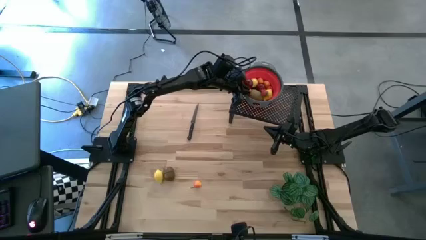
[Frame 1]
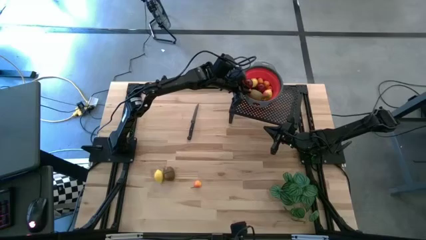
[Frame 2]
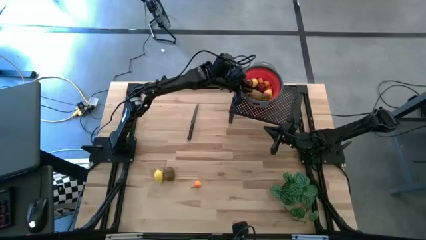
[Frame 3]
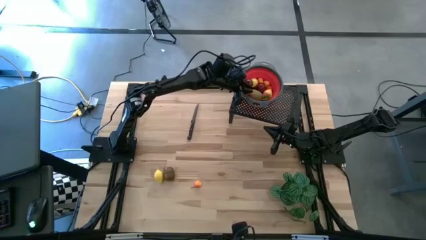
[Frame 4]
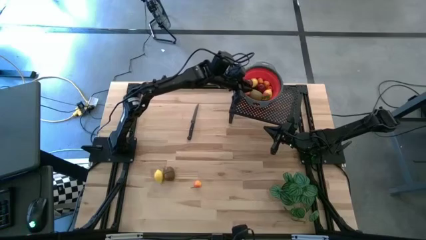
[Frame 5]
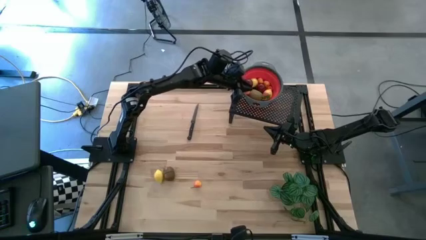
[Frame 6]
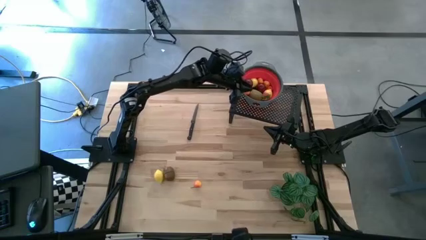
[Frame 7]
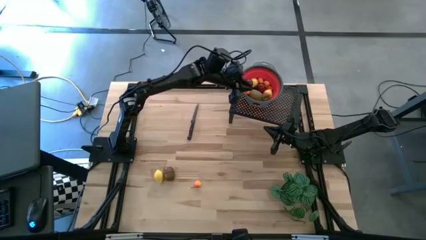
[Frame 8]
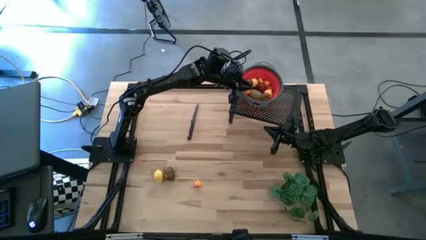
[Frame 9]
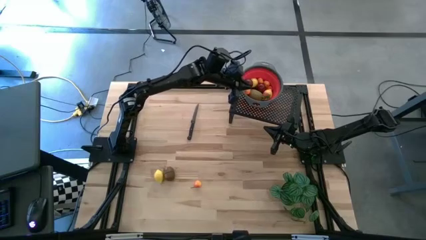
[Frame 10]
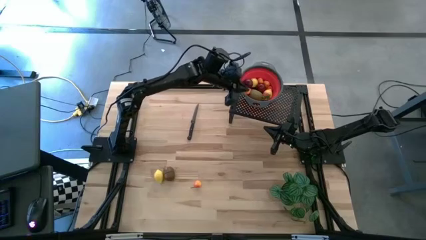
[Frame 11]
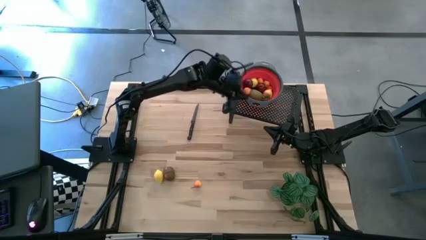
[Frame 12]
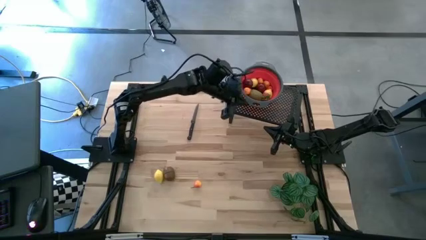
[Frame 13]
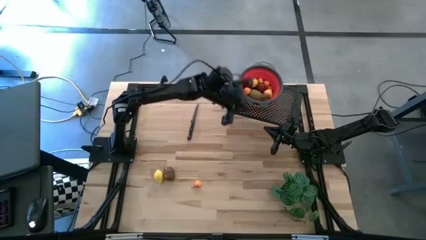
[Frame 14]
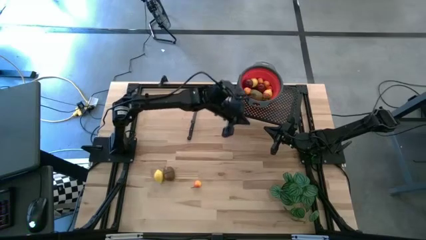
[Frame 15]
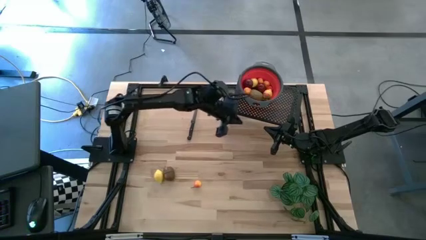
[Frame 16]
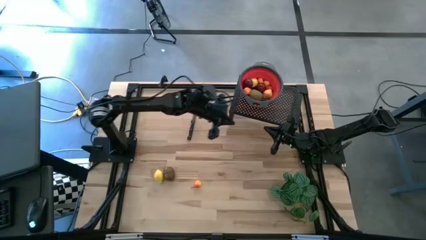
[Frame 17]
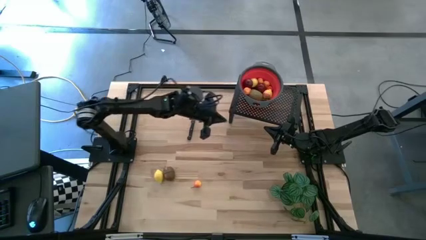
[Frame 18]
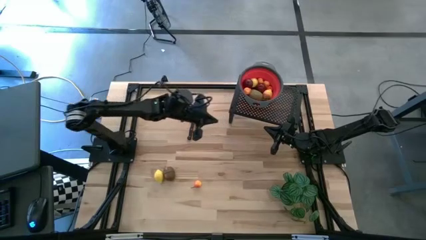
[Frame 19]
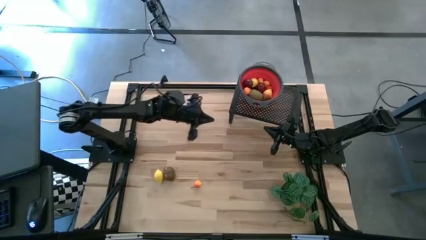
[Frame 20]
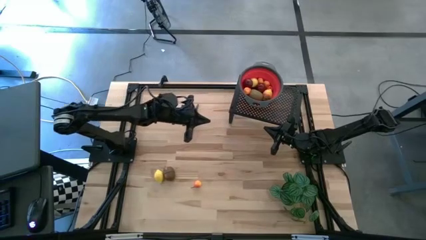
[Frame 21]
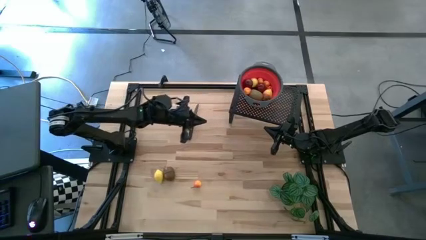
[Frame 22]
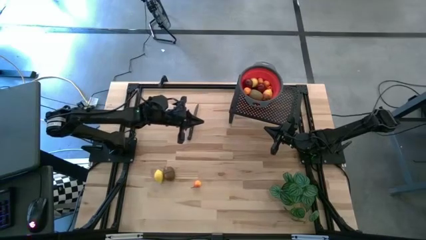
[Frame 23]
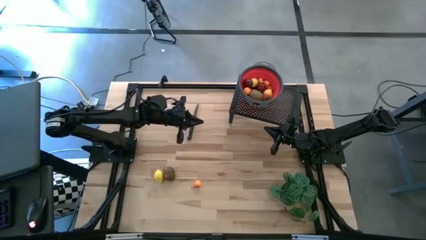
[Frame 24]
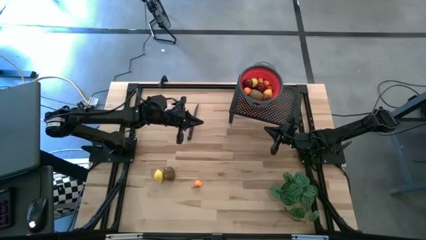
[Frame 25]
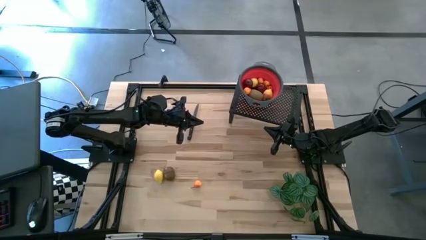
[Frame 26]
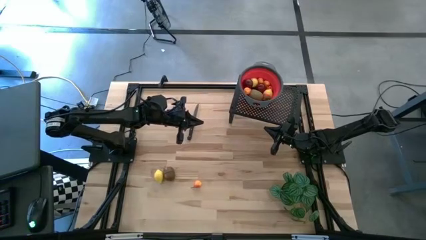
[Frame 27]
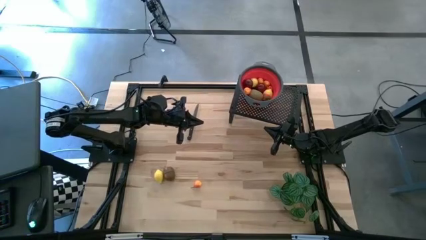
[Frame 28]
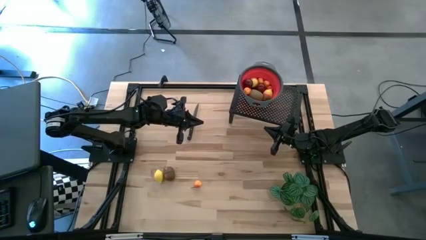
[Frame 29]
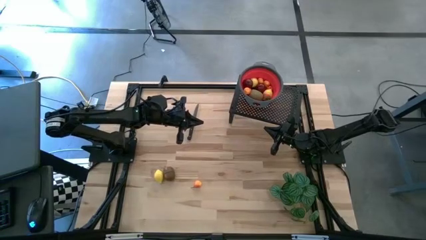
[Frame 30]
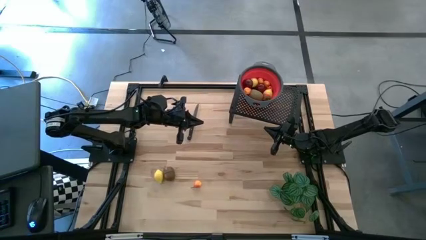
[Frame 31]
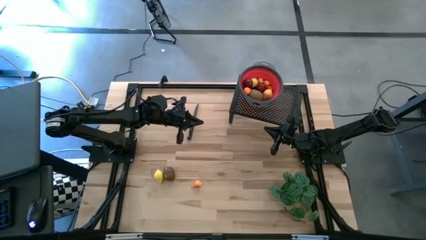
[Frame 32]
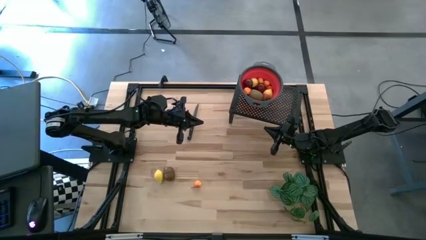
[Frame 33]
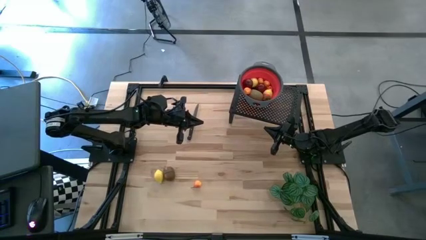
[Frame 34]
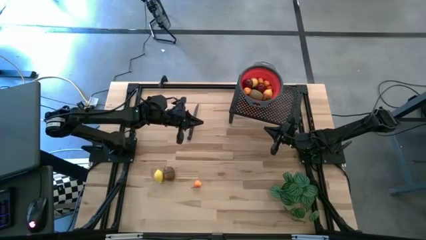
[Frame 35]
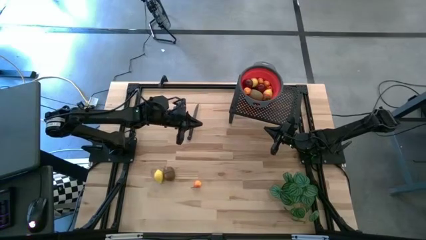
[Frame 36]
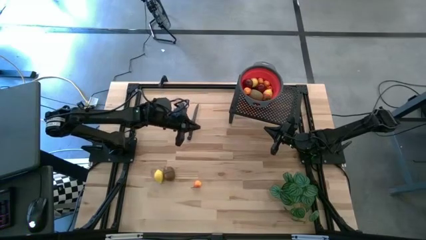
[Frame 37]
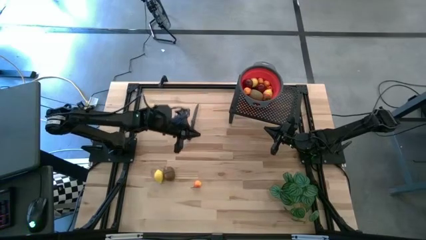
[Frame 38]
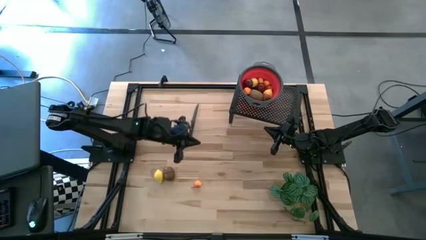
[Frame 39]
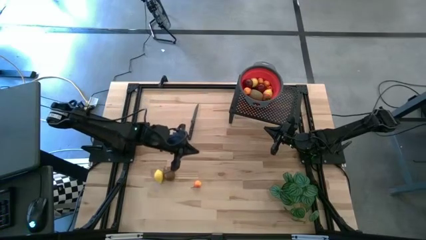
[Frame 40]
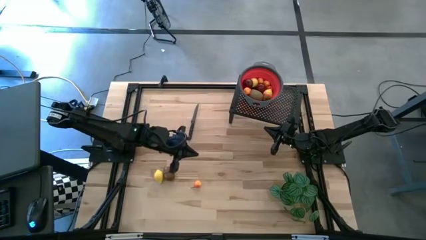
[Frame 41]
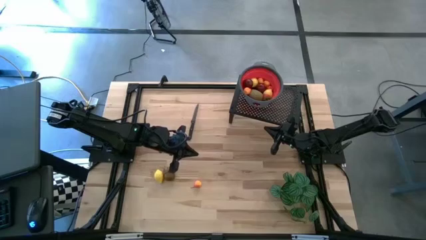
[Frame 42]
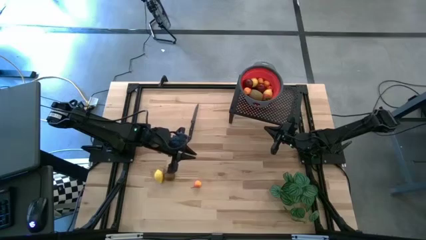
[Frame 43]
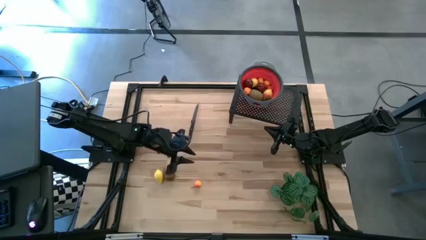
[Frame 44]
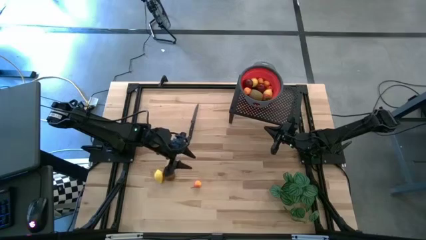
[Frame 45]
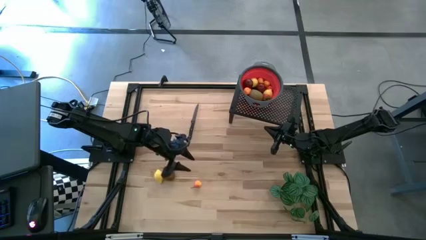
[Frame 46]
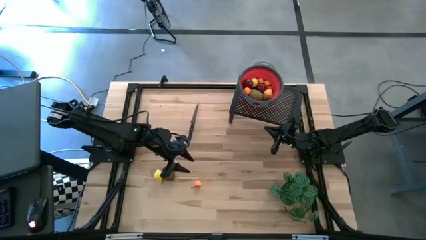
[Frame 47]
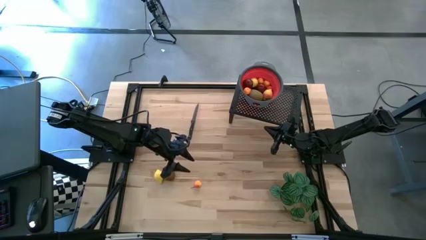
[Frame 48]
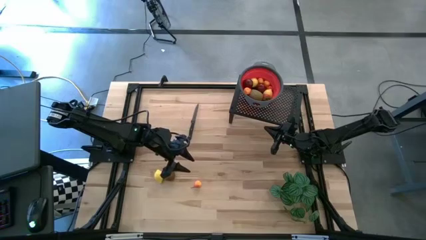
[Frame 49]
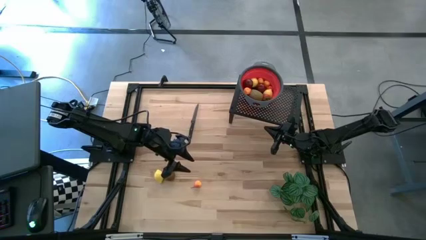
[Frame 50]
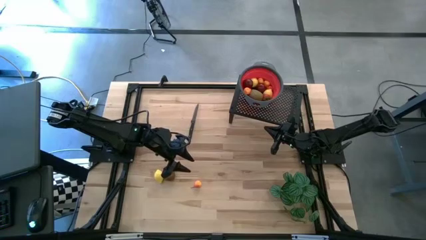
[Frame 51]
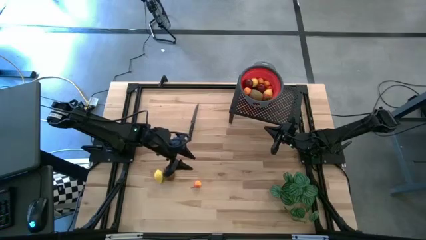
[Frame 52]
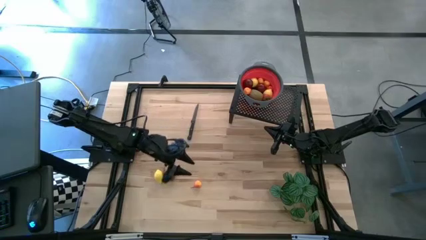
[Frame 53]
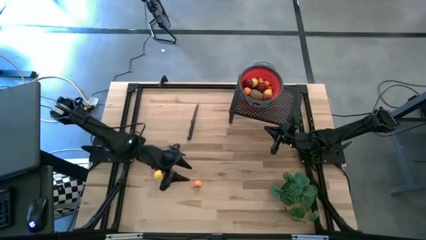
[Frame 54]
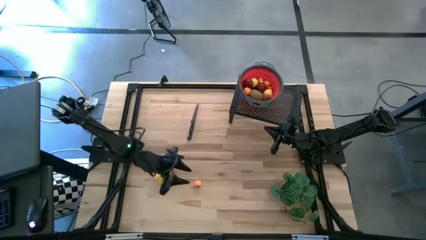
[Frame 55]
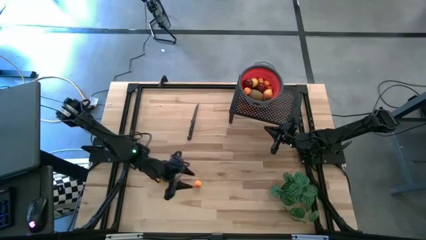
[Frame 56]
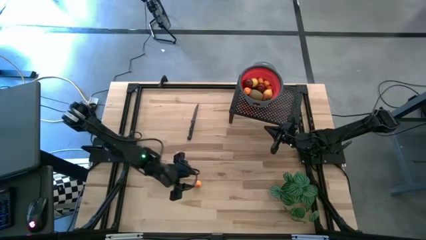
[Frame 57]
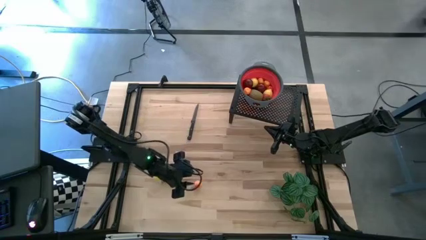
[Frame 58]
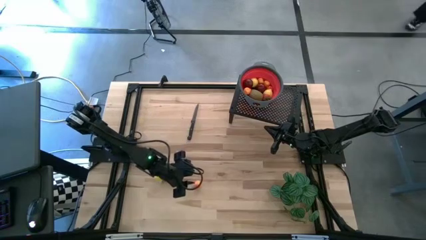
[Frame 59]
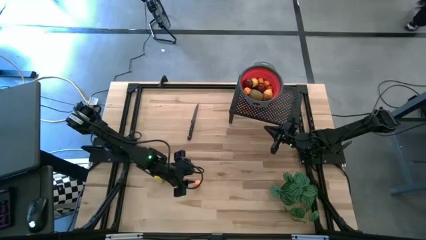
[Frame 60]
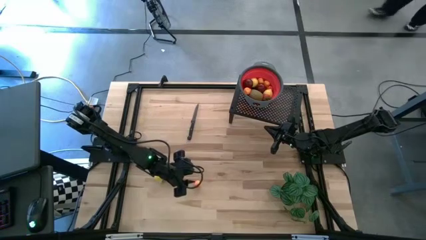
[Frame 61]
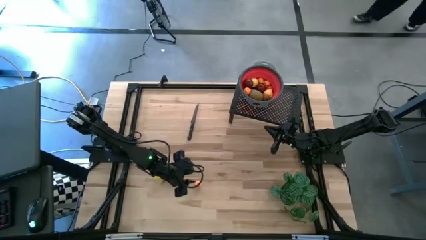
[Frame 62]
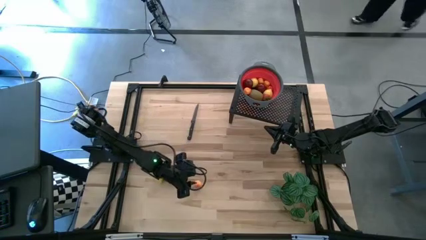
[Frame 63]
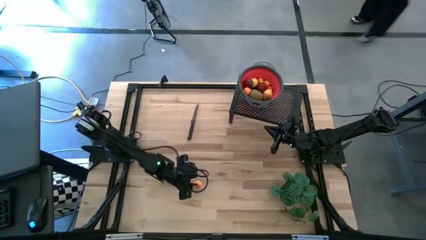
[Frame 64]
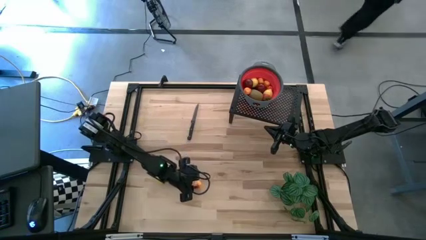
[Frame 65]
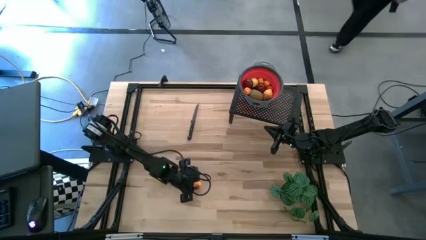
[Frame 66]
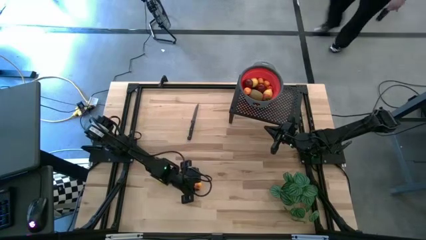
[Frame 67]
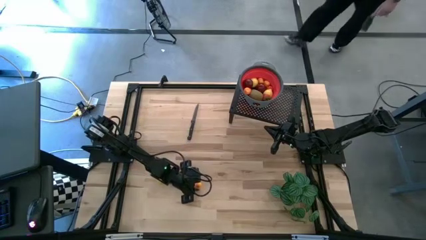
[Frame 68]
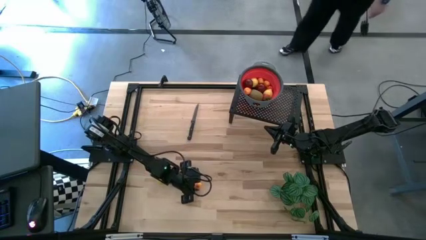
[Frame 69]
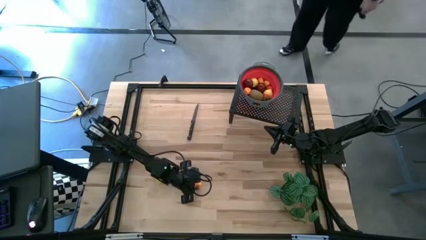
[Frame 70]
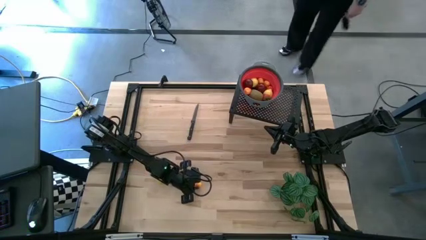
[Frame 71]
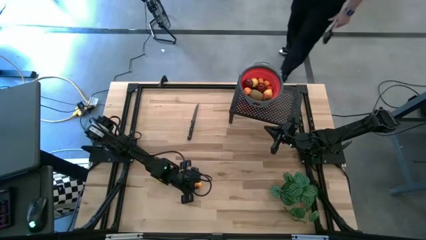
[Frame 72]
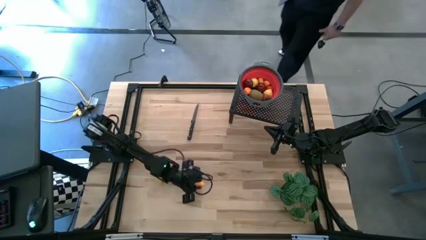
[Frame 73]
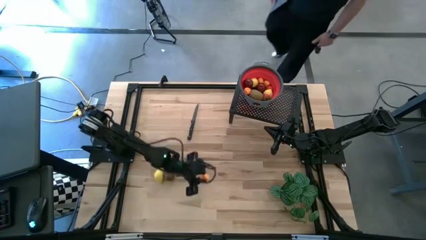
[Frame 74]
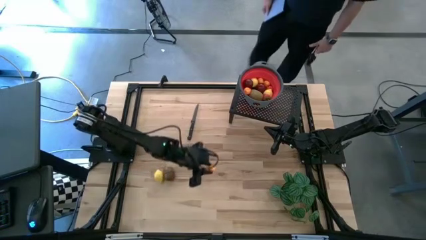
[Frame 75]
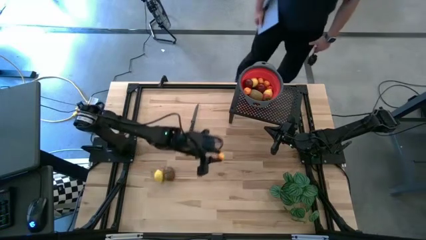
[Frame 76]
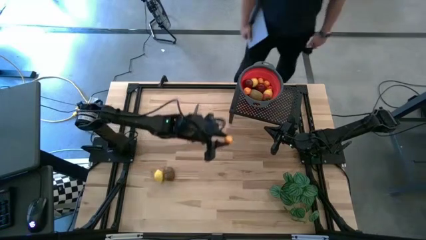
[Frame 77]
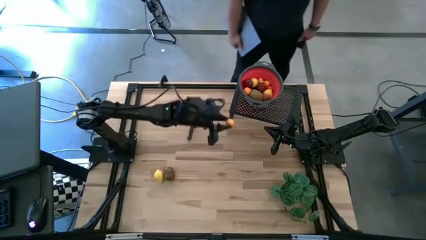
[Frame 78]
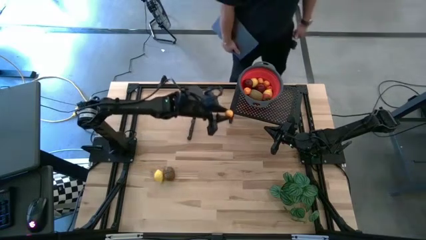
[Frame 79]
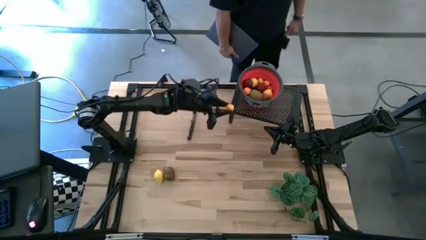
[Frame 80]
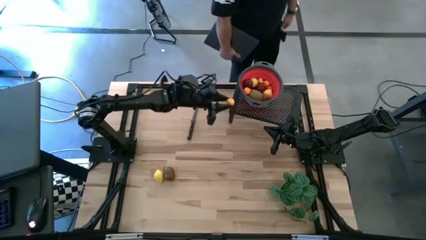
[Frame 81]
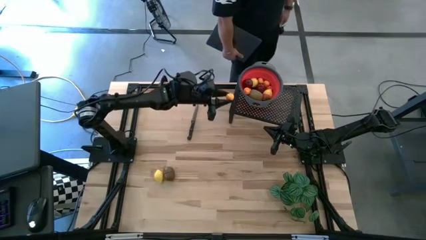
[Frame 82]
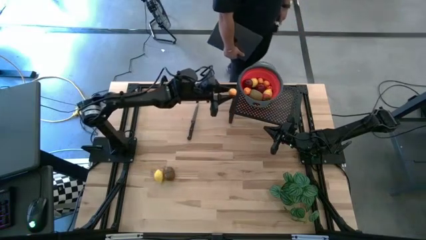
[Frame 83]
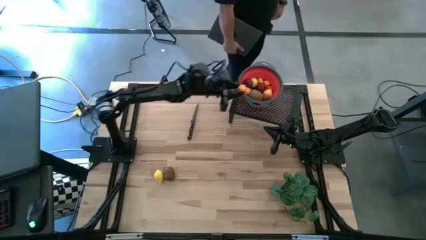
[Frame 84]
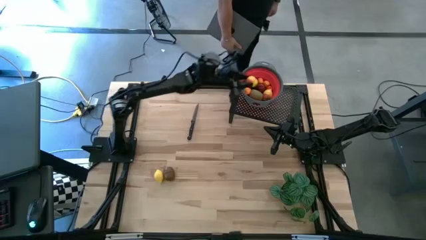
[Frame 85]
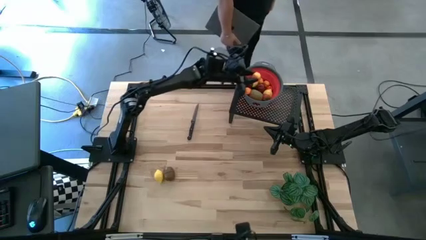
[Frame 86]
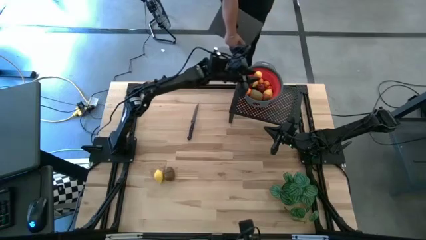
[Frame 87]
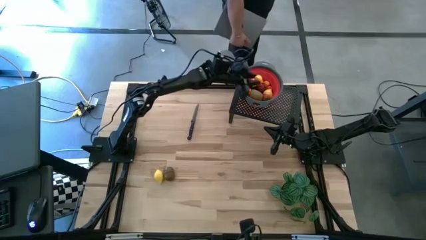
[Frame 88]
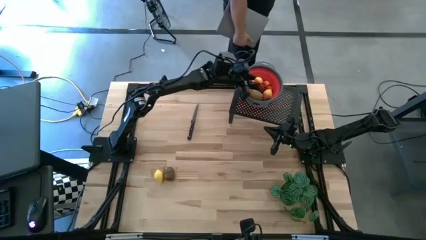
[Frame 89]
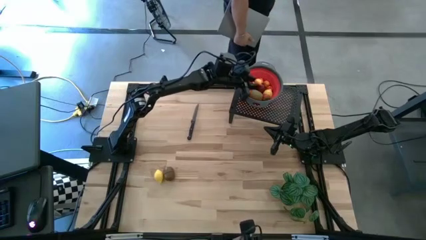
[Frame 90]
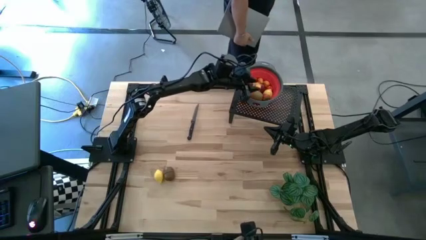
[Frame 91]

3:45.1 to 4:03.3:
Task: Pick & Place Fruit
Put the orange pear into the red strainer bowl on the shelf
